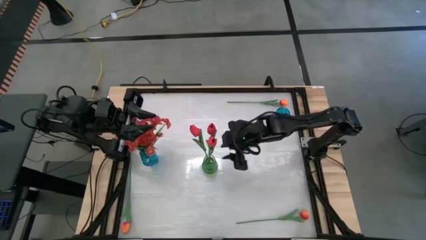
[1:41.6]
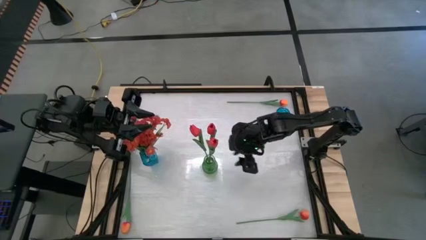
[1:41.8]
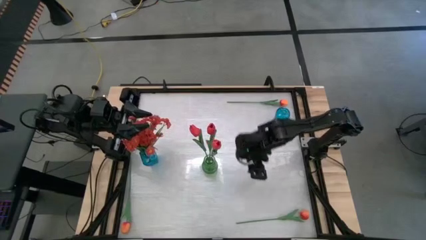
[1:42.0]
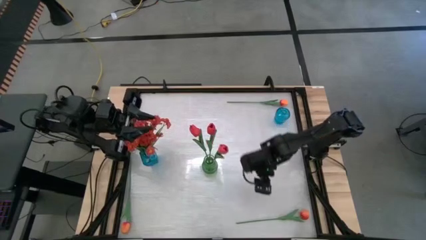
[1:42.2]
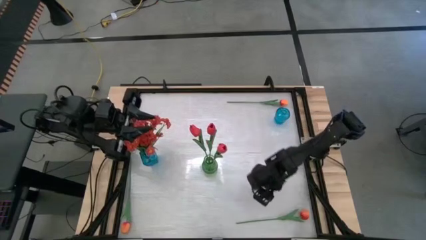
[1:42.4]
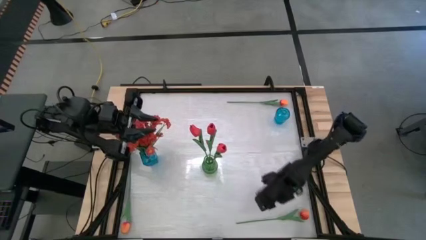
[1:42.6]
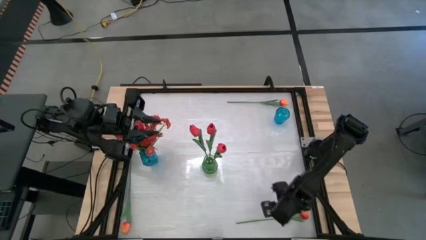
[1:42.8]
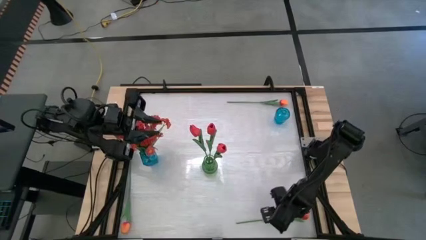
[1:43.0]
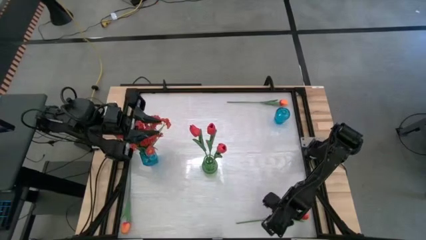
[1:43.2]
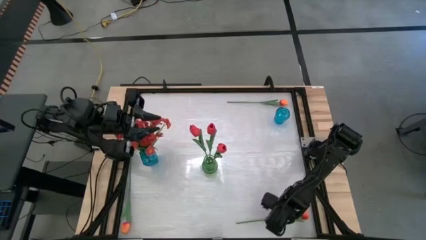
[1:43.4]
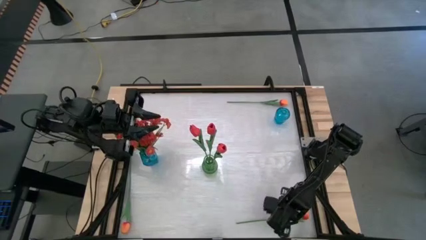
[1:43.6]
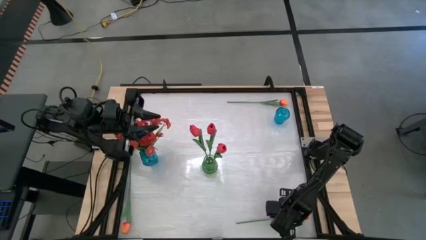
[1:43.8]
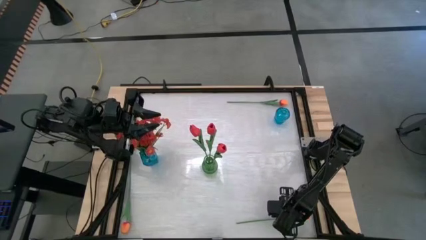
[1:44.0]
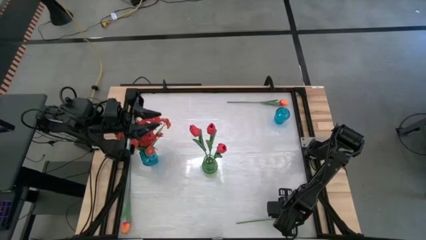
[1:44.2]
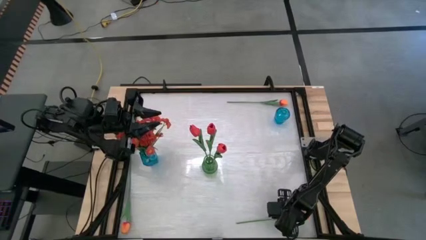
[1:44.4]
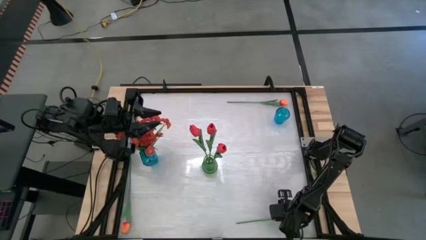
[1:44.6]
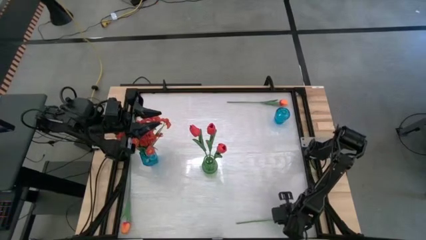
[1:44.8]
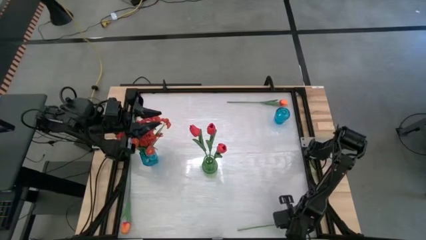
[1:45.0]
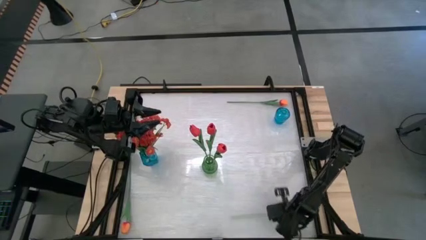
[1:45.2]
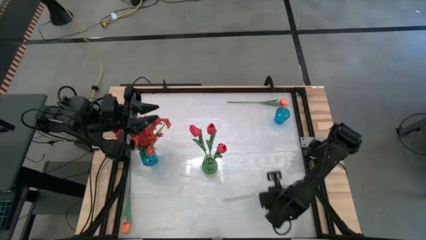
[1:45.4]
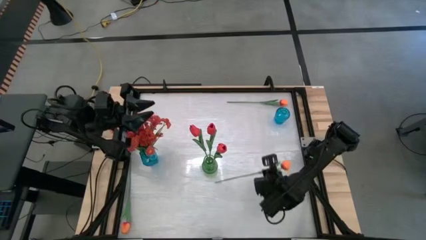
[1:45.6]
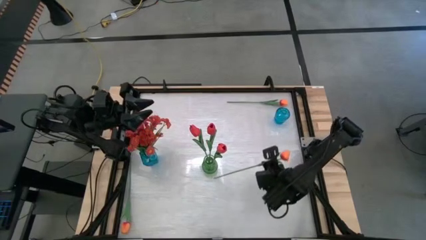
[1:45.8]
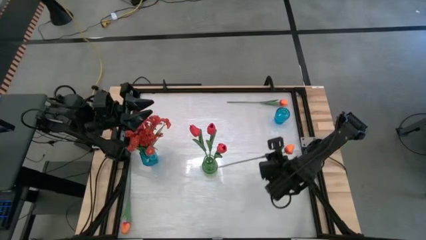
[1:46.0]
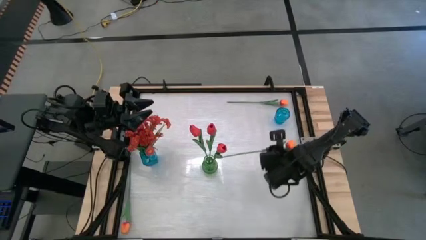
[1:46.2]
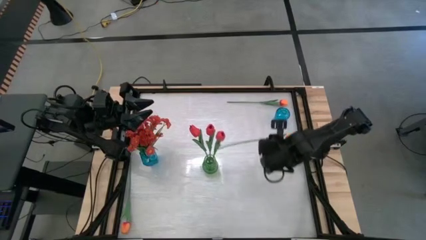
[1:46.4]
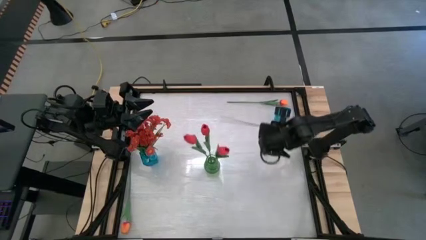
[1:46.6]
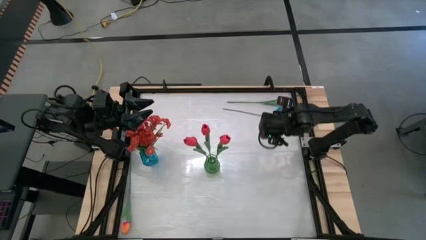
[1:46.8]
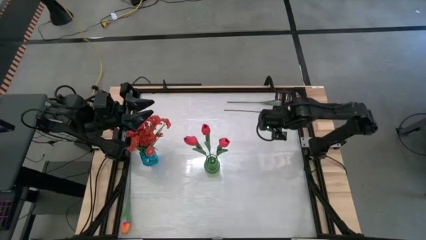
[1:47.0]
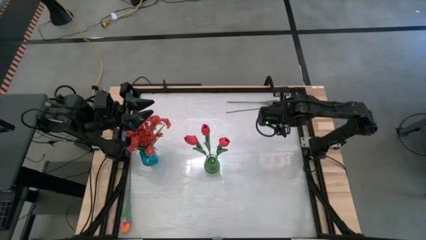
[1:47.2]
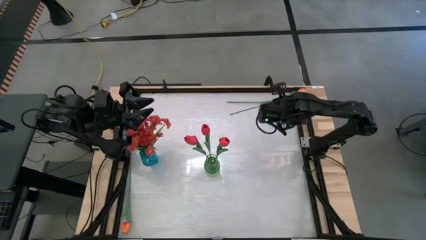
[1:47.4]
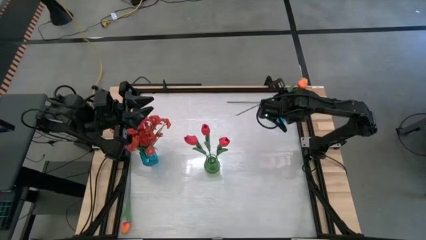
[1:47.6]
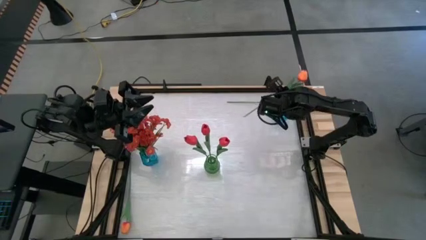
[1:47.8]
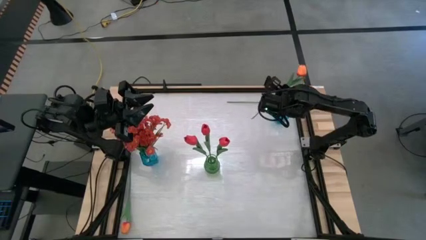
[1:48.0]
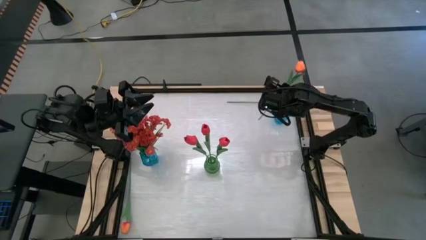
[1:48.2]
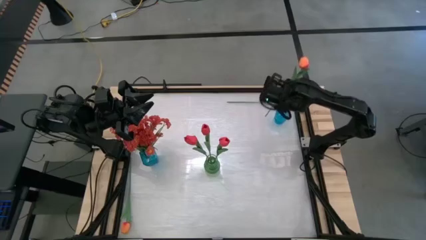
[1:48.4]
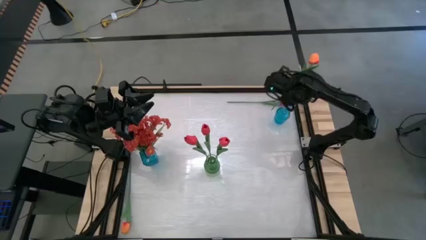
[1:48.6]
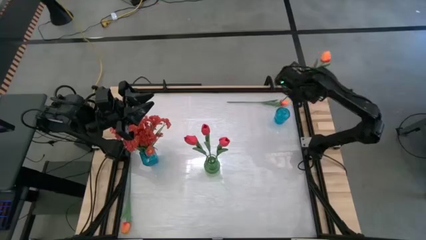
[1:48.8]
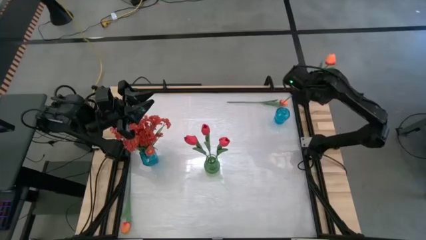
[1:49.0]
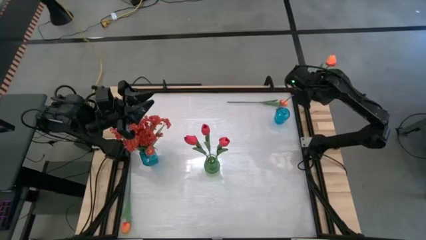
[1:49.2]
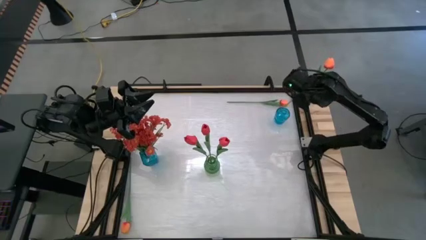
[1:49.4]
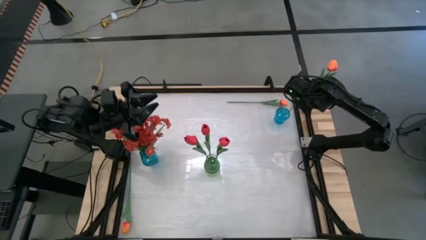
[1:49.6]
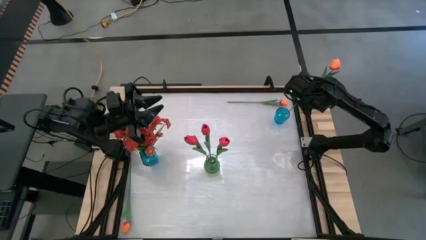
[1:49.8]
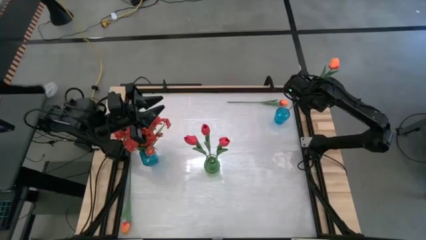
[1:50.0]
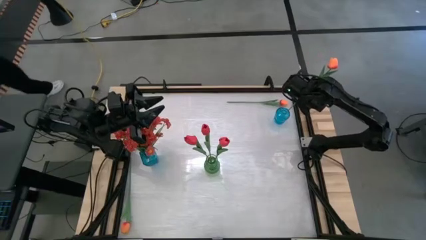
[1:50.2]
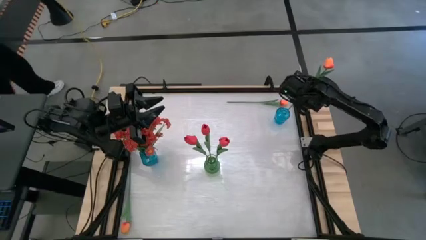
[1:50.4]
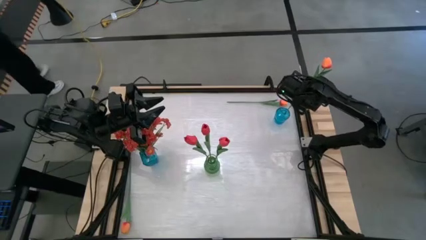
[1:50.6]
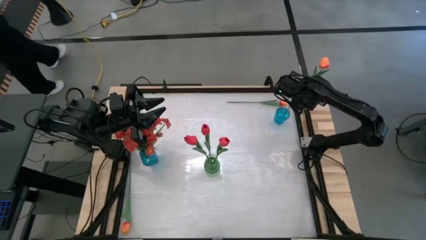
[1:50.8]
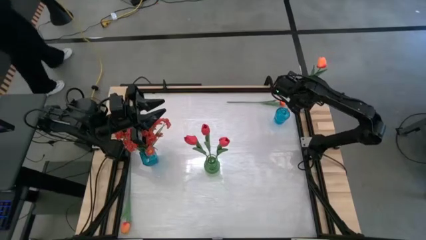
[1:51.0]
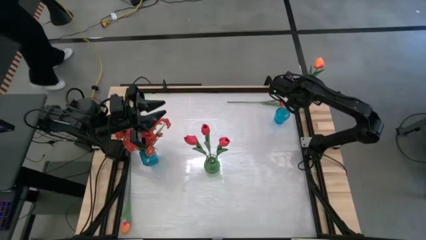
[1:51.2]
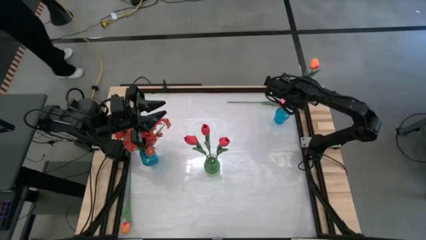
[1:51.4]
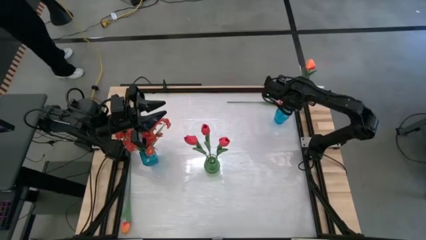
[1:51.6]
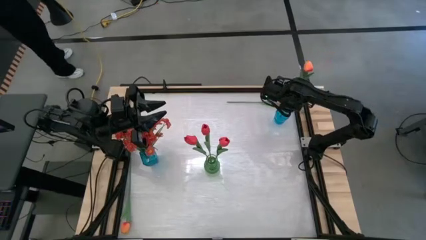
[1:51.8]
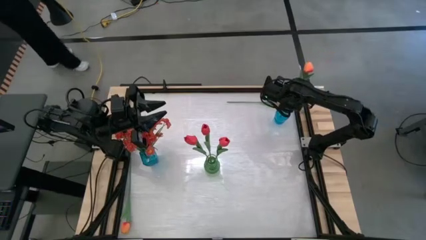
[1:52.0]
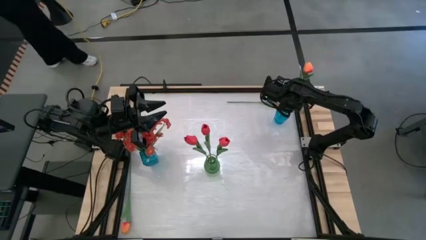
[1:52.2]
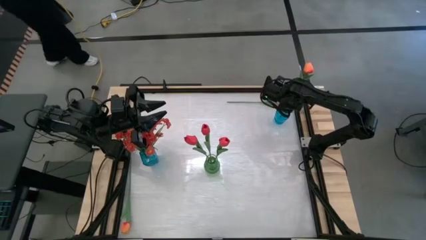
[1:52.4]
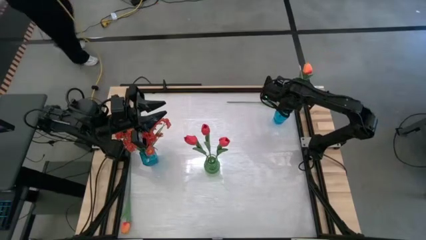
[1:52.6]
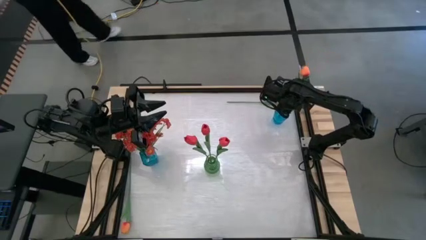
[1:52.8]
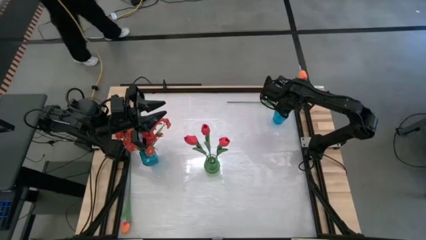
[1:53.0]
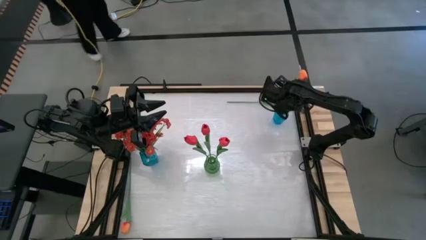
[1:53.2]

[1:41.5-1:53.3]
Task: Sort flowers into vase by color
Put the bottom right orange flower into the right blue vase

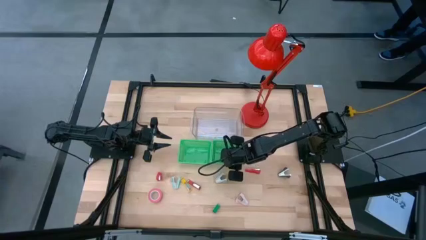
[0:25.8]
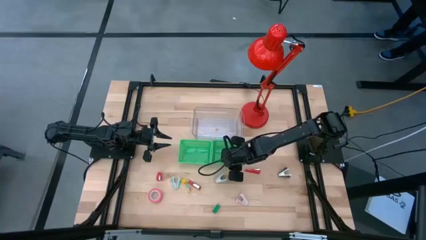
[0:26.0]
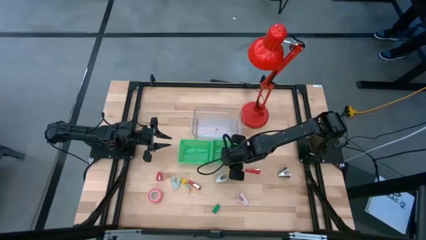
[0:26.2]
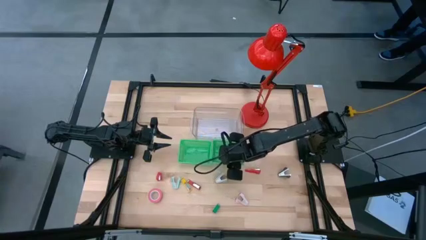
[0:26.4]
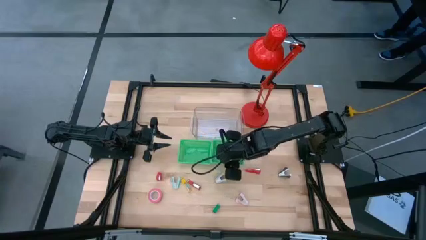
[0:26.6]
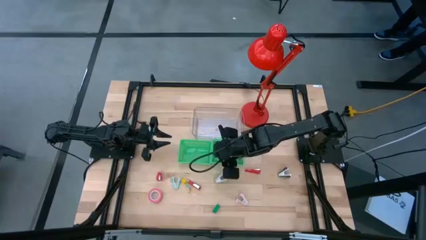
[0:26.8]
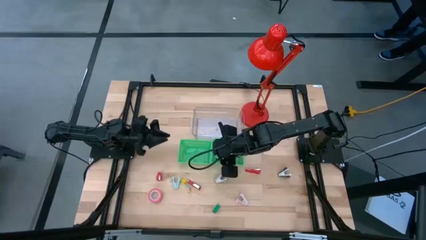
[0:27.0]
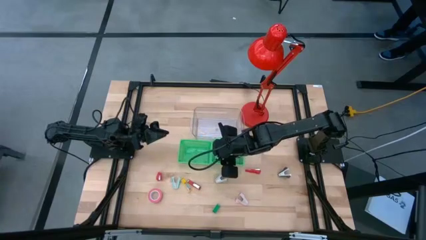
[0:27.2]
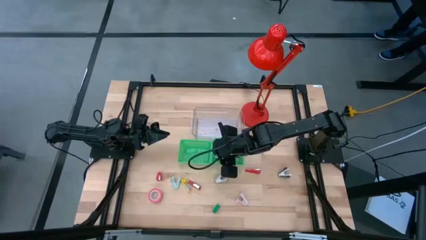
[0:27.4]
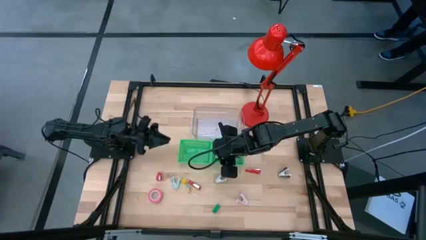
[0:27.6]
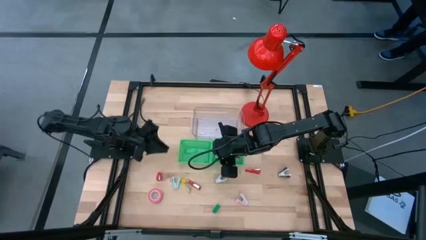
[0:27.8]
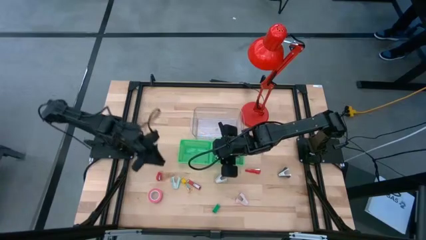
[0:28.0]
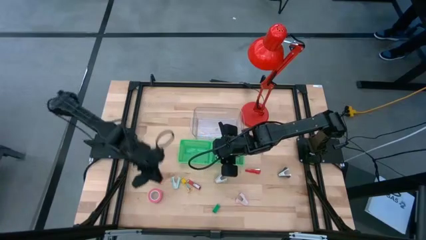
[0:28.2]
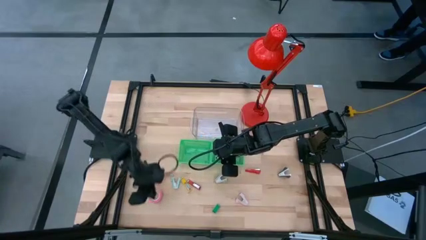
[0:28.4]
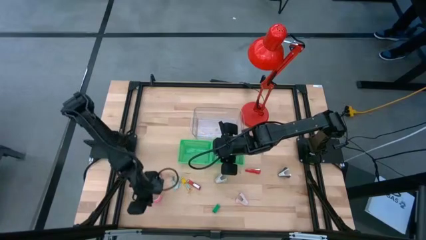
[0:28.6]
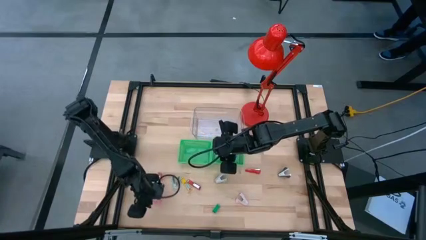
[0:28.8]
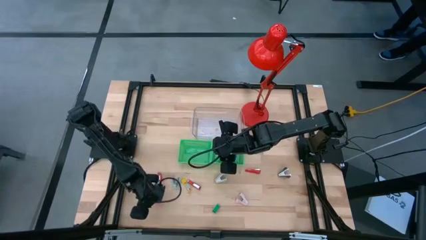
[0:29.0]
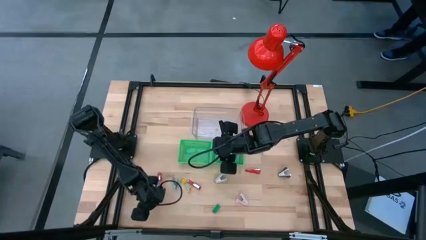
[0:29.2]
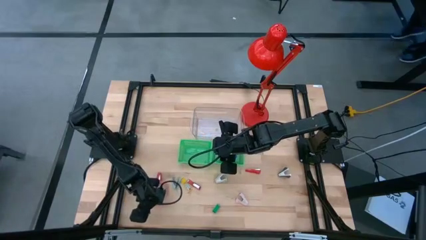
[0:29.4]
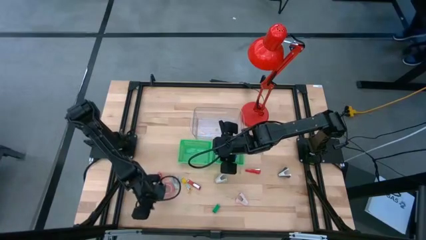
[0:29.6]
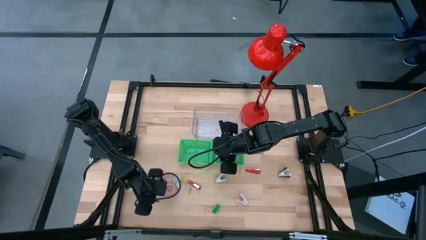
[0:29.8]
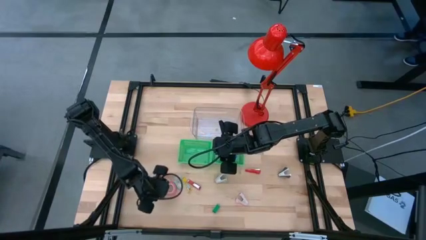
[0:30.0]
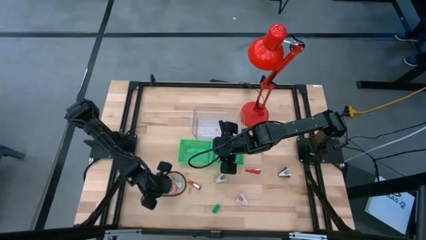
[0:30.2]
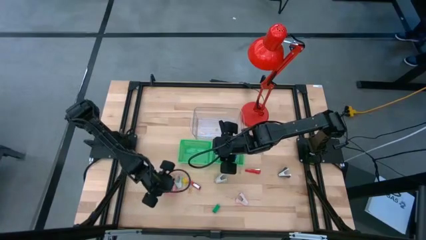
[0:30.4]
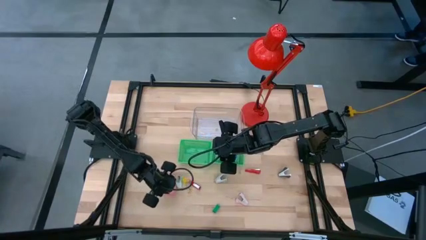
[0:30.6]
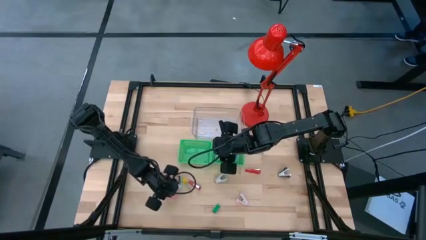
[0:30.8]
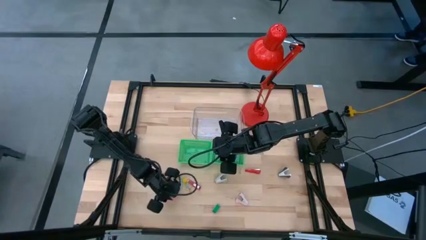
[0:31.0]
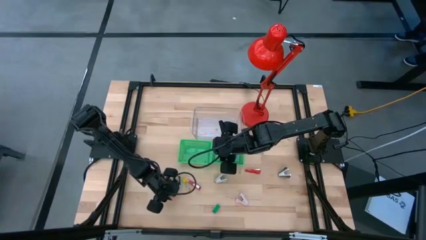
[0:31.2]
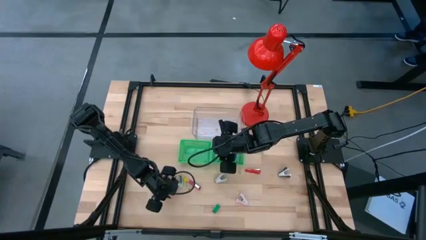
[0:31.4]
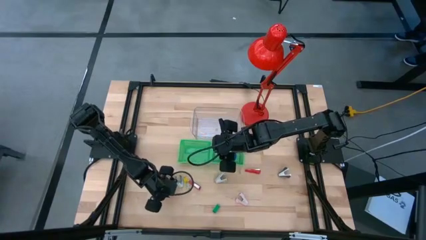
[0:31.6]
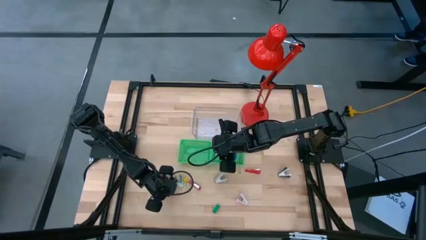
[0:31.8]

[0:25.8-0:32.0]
Task: Pick and place Stapler, Stapler remover, tape
Put the pink tape into the right green bin
